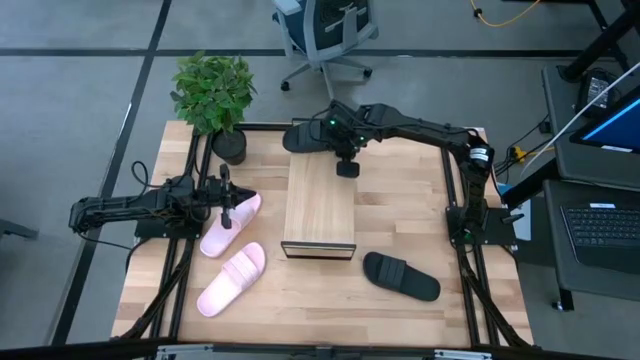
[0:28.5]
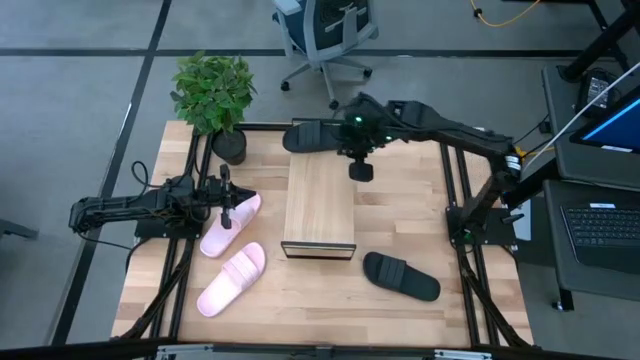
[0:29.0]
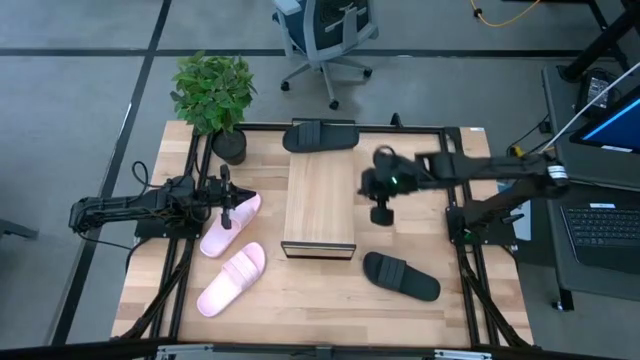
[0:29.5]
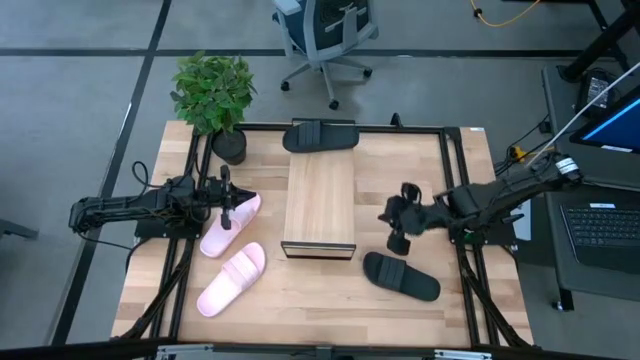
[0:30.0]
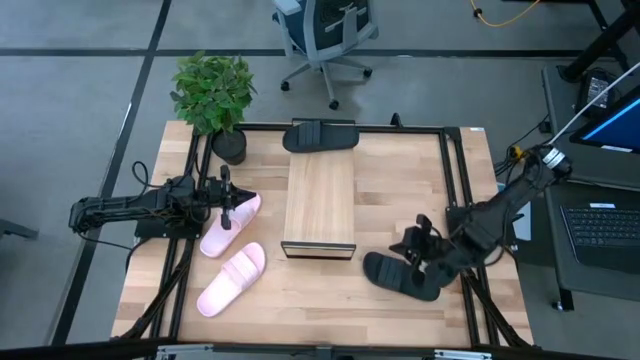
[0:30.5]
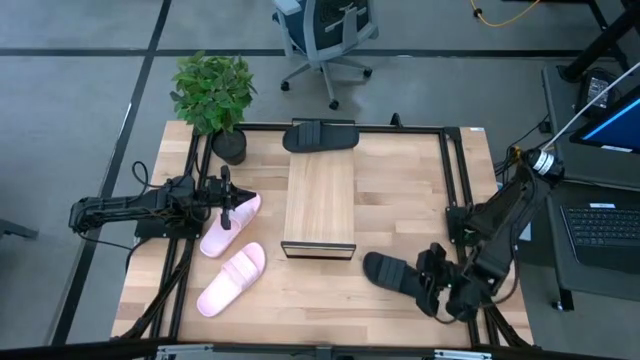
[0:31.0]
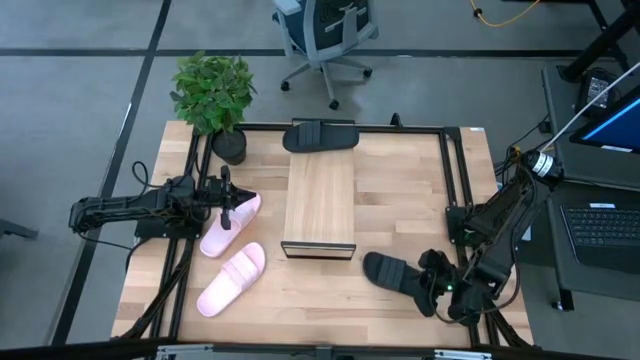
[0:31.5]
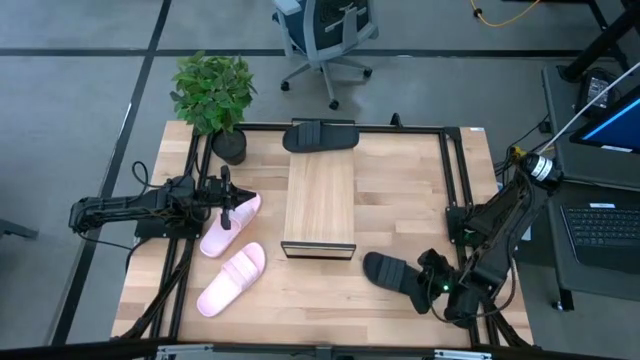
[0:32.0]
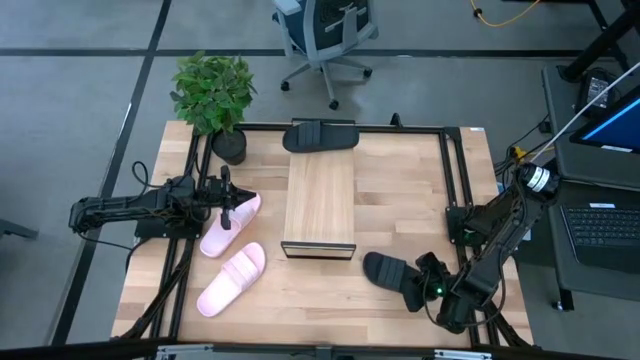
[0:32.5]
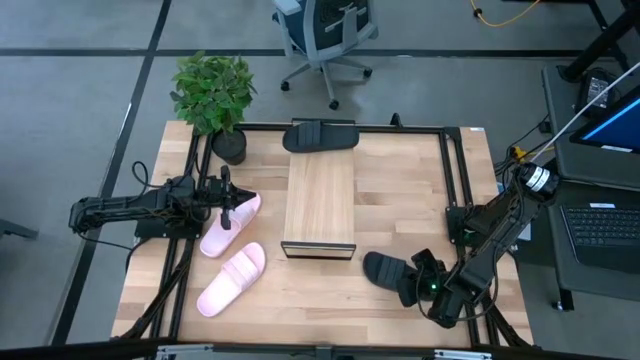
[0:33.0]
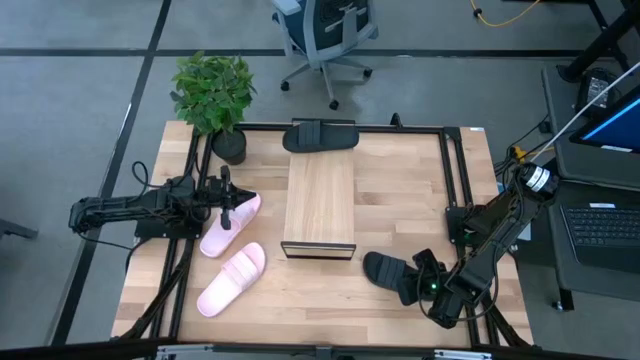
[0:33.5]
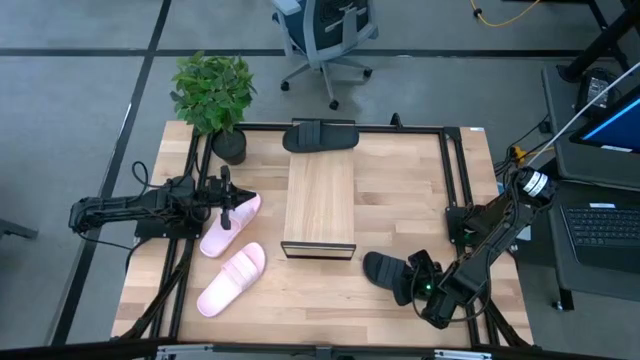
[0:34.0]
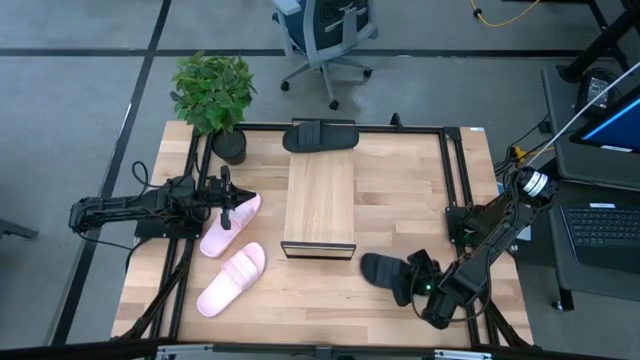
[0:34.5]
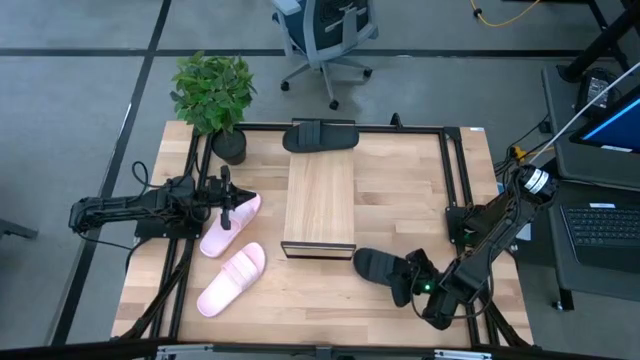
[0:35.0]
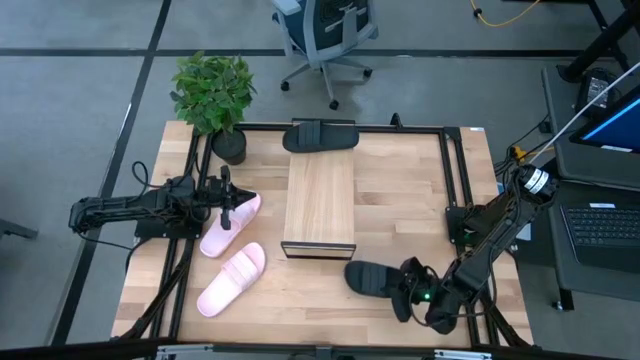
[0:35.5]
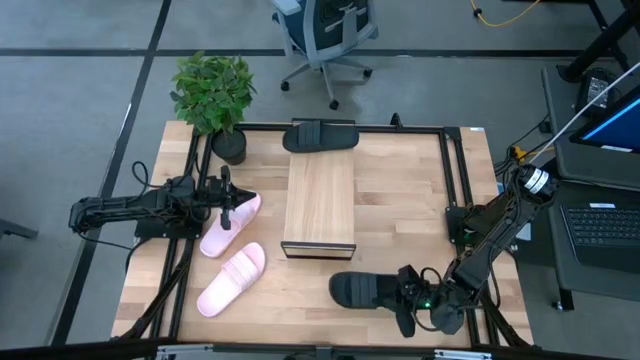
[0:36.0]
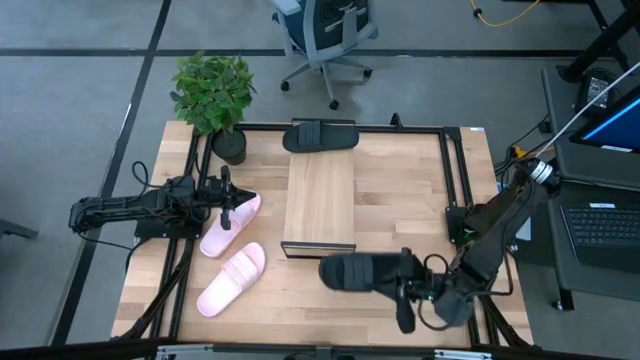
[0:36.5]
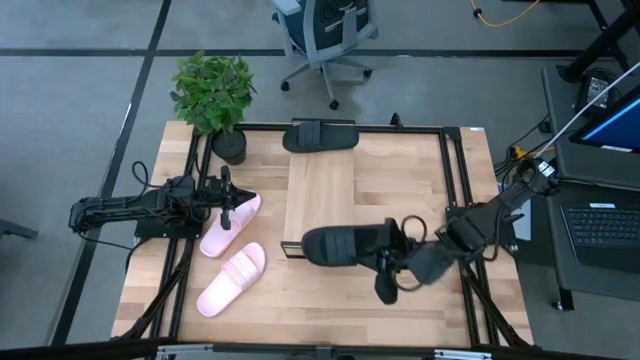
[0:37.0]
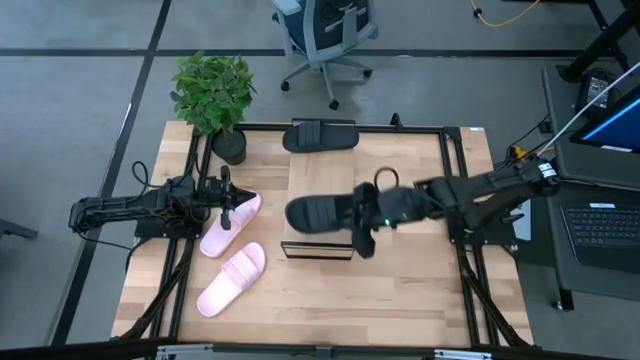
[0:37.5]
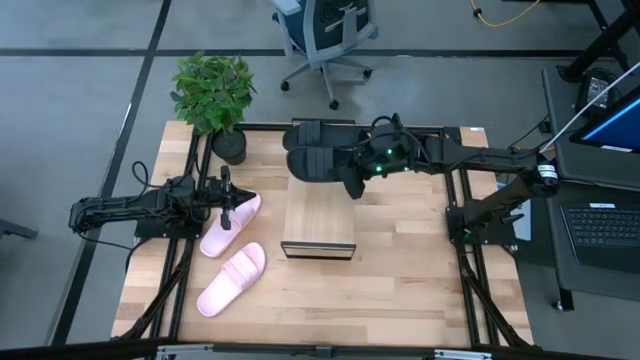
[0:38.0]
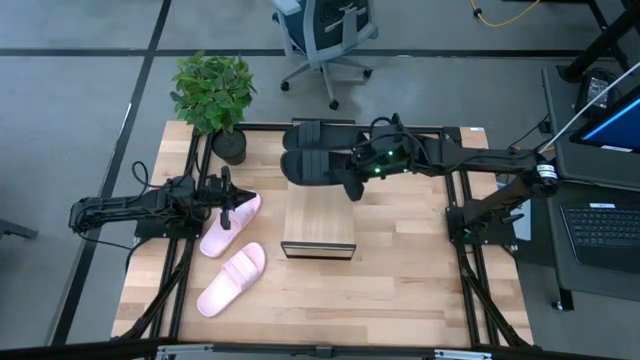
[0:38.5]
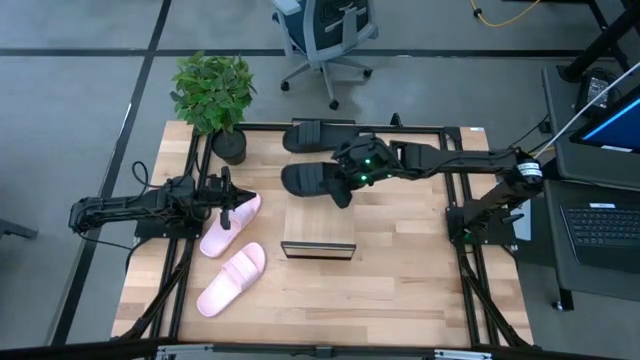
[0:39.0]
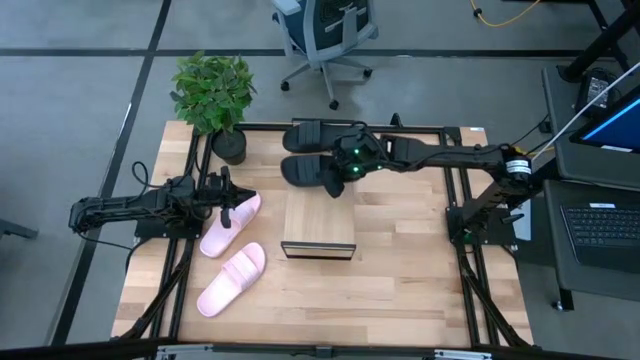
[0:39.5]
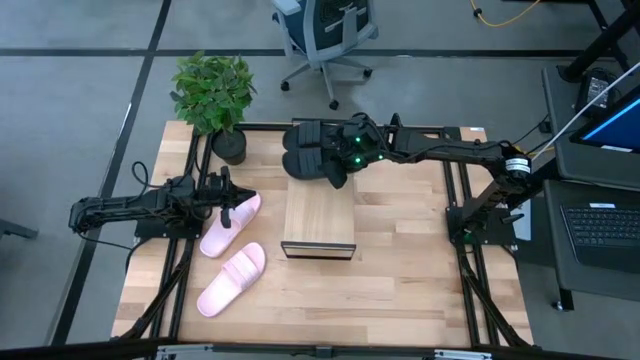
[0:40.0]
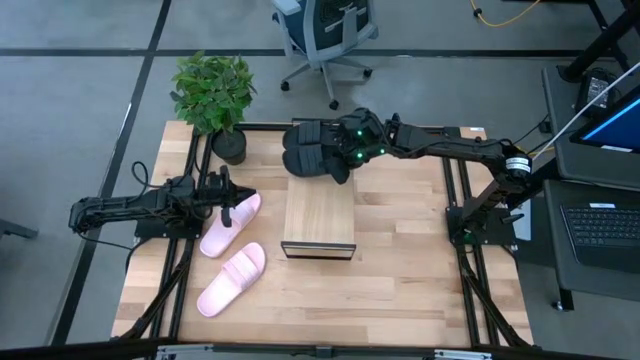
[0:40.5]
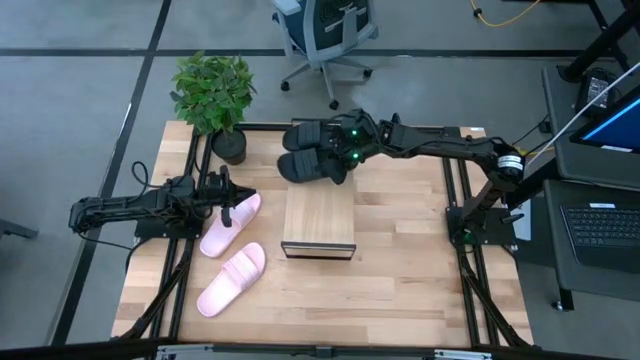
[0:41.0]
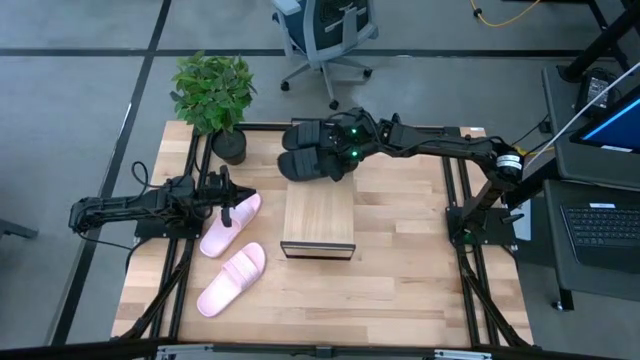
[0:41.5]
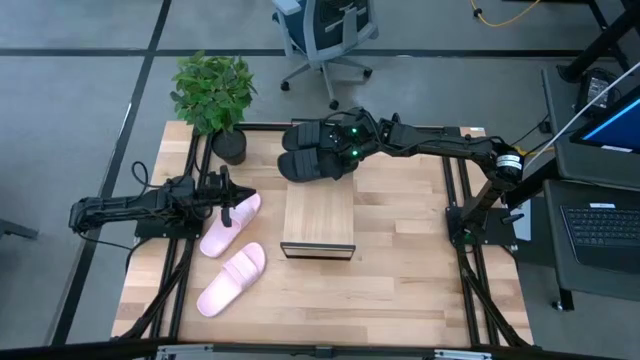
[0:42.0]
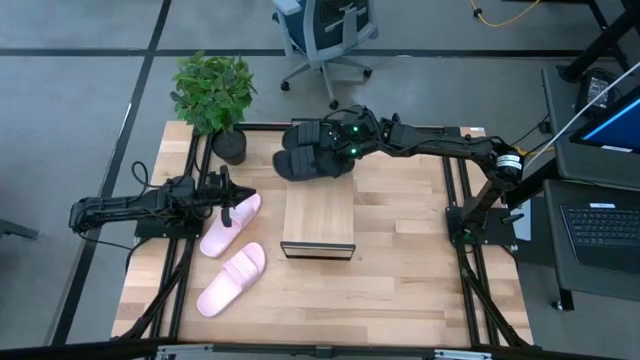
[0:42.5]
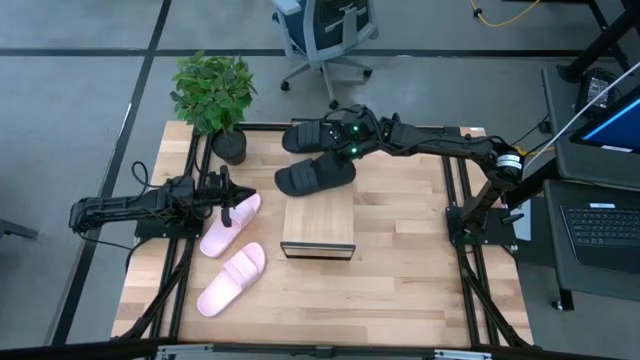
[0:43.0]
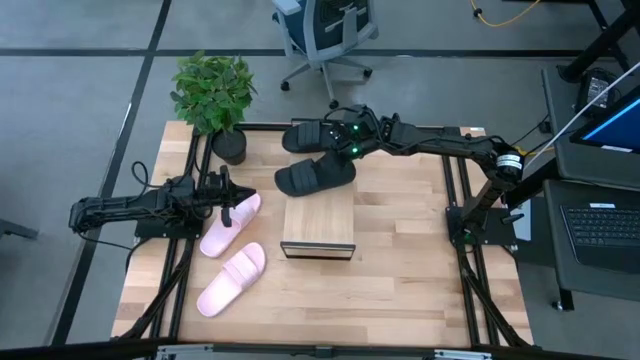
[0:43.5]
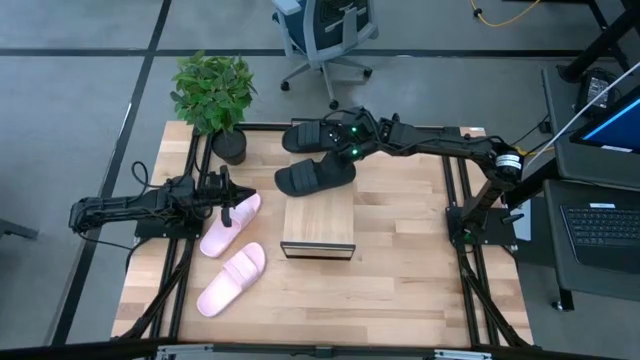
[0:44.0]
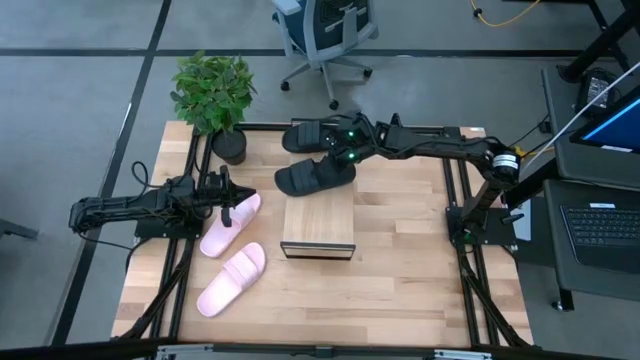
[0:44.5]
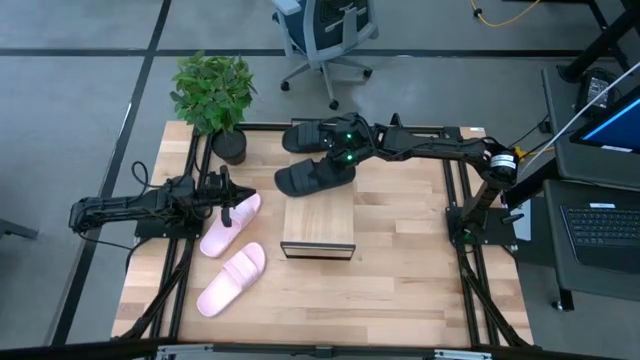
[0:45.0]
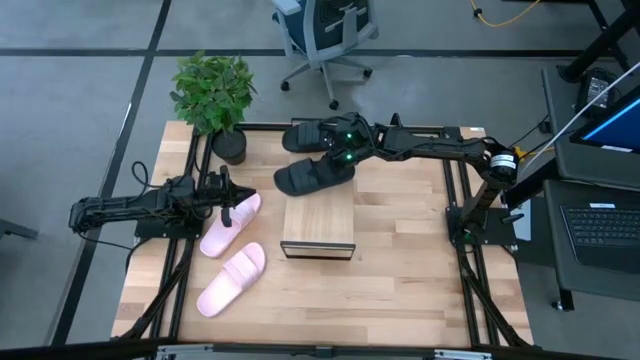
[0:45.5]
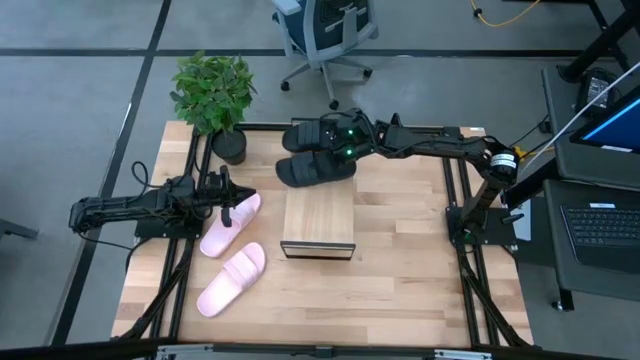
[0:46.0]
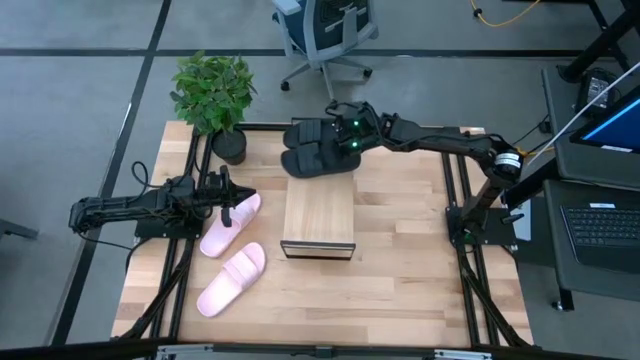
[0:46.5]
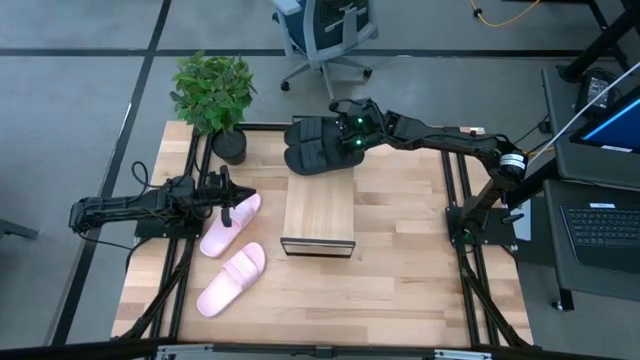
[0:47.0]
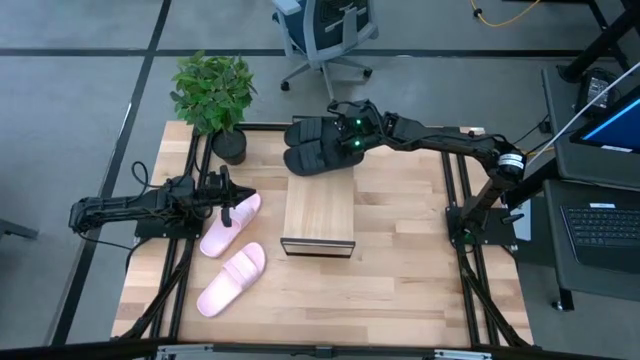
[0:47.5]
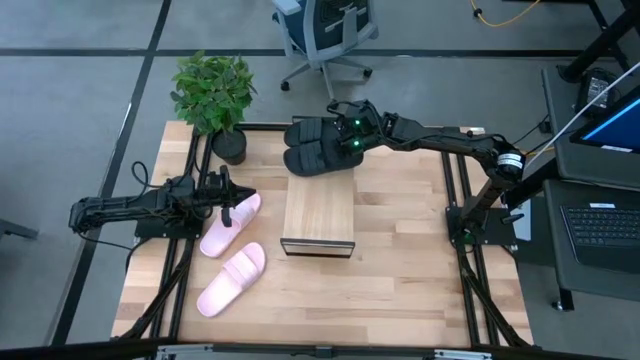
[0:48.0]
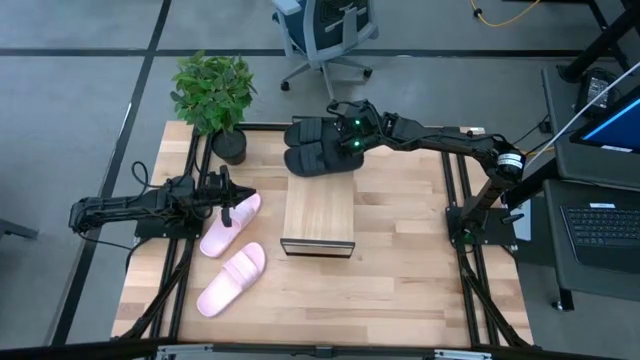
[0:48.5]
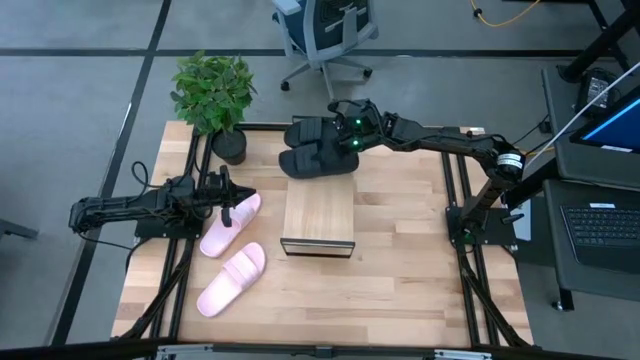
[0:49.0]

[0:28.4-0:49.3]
Task: Pick and place slides into the shelf
Put the black slide on the shelf
